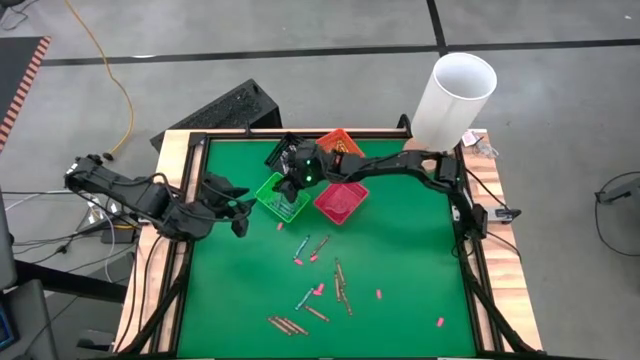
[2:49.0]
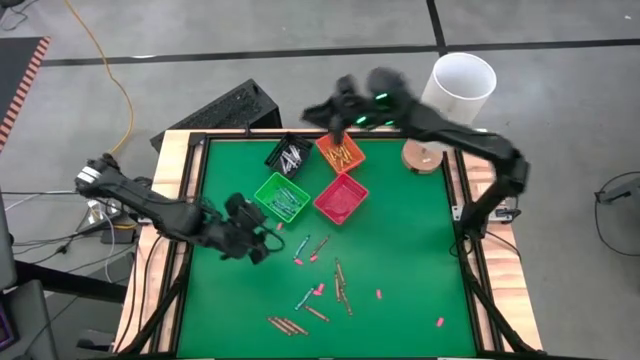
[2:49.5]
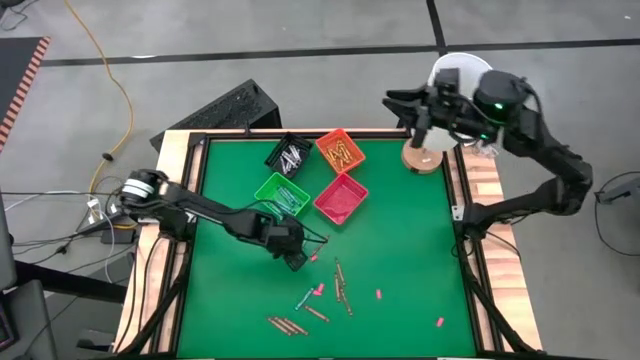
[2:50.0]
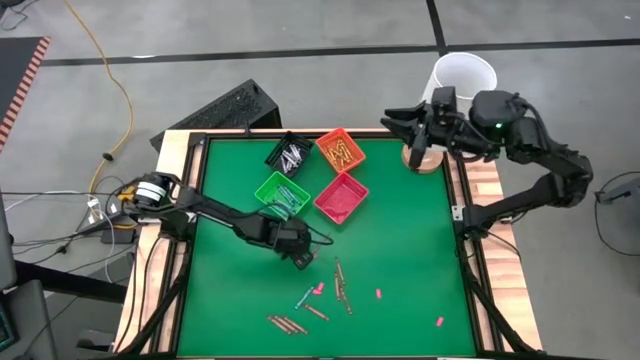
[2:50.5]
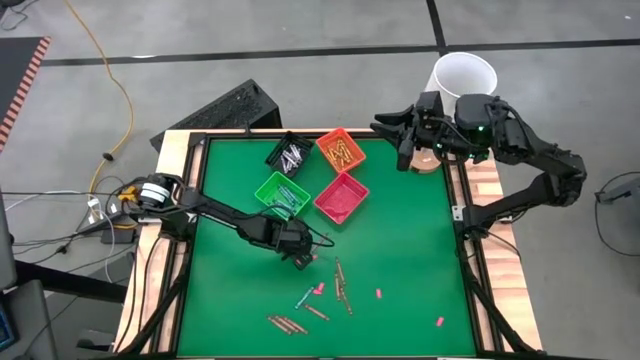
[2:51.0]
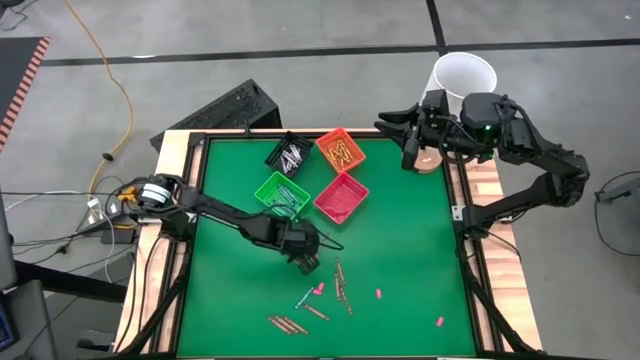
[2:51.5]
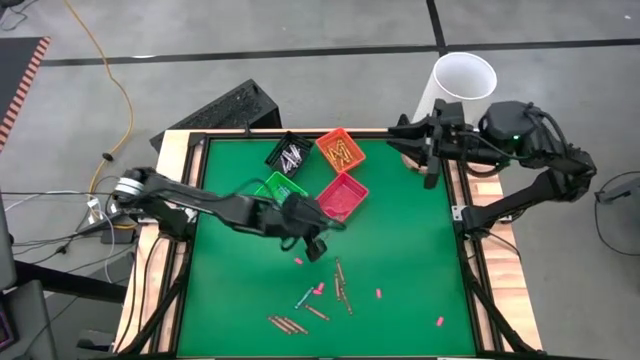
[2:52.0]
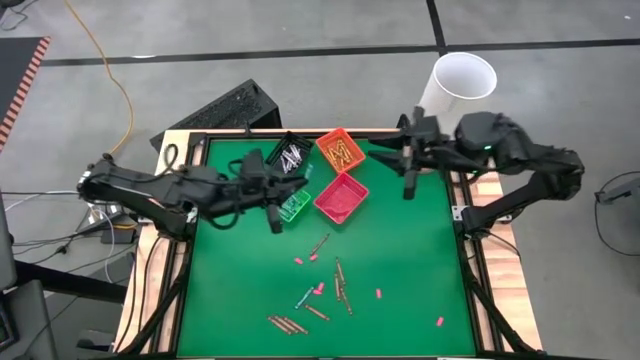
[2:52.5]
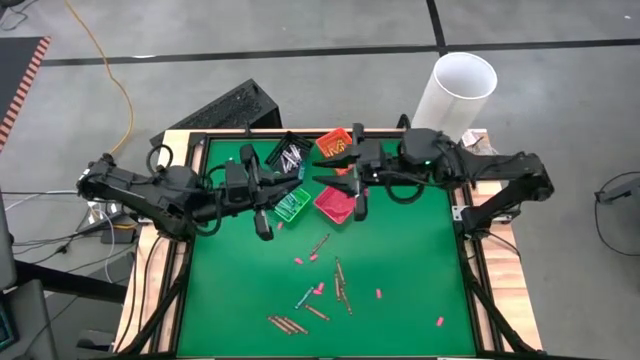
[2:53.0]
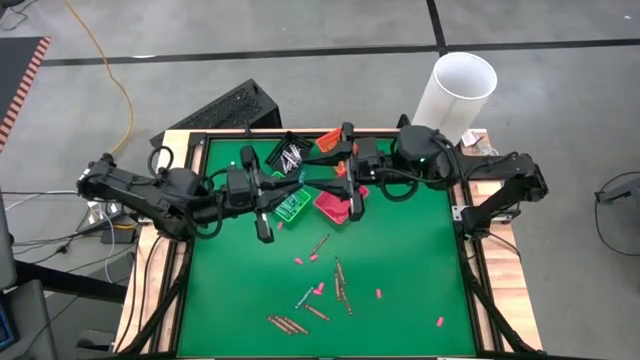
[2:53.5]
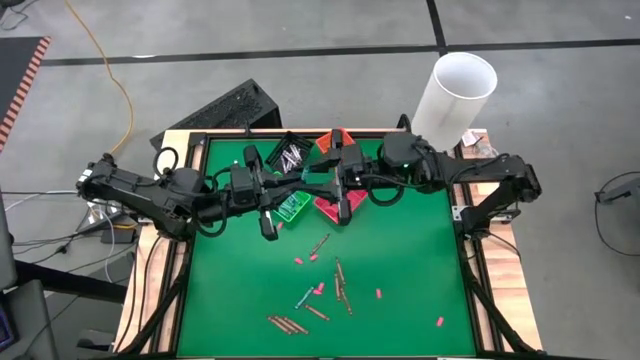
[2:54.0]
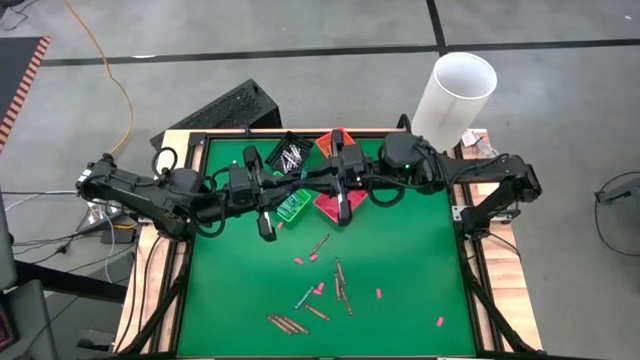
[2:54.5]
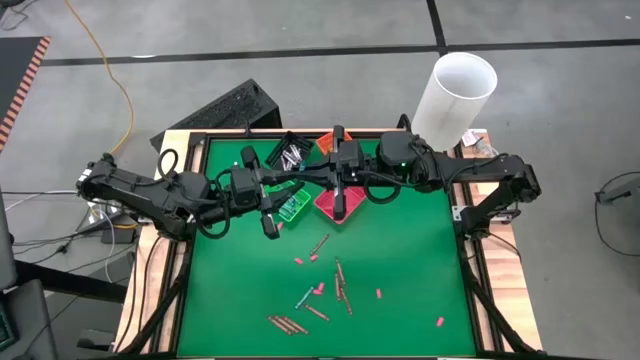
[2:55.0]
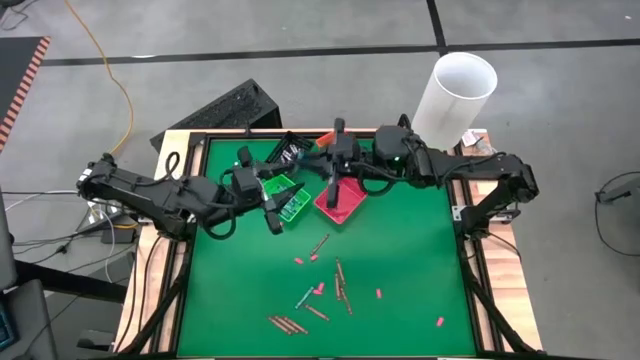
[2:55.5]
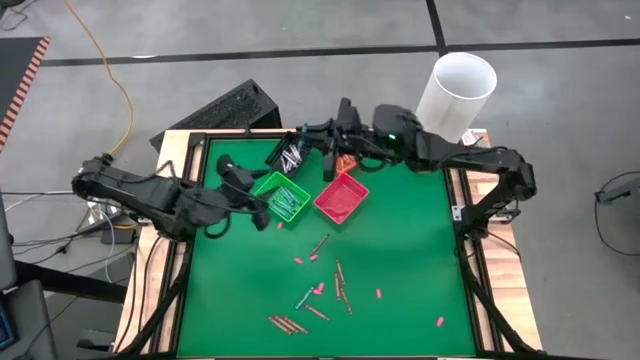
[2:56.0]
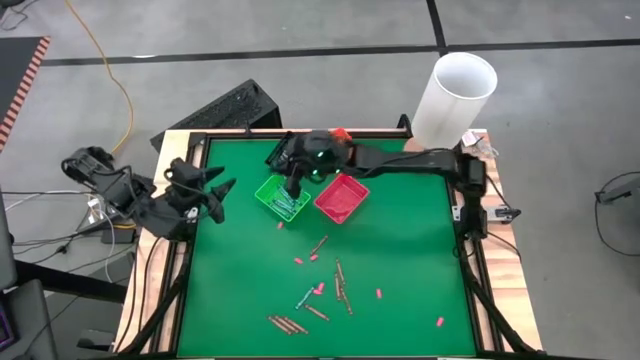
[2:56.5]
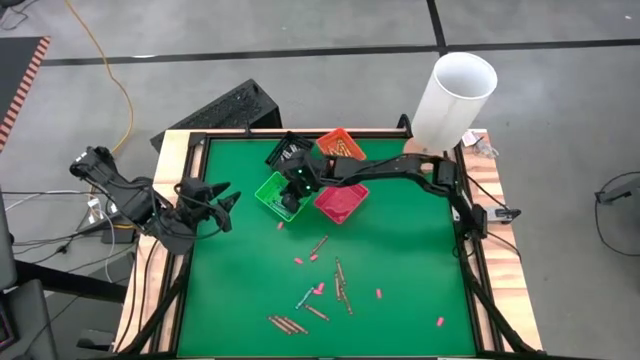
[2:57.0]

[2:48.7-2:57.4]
Task: Sort crayons
Put the blue crayon into the bin

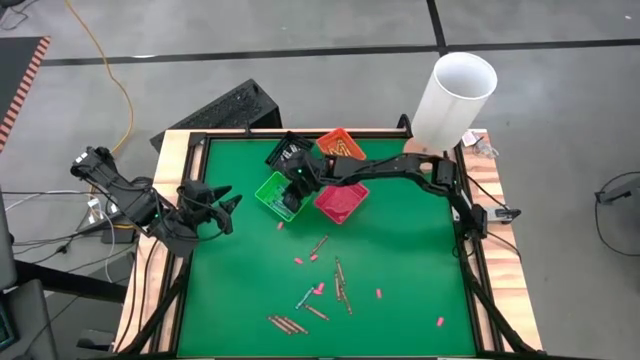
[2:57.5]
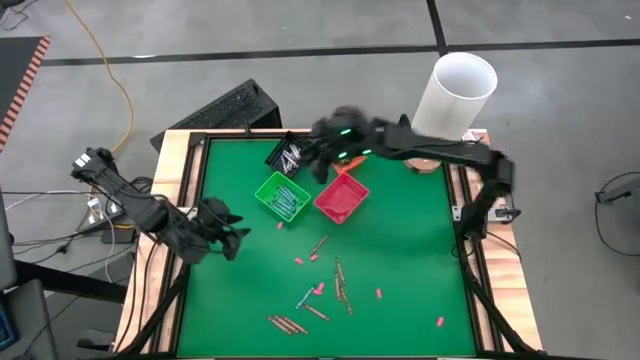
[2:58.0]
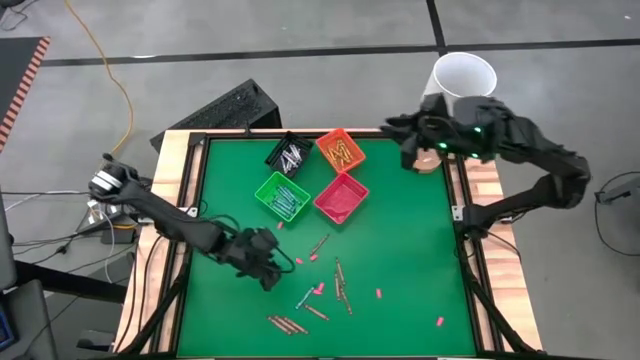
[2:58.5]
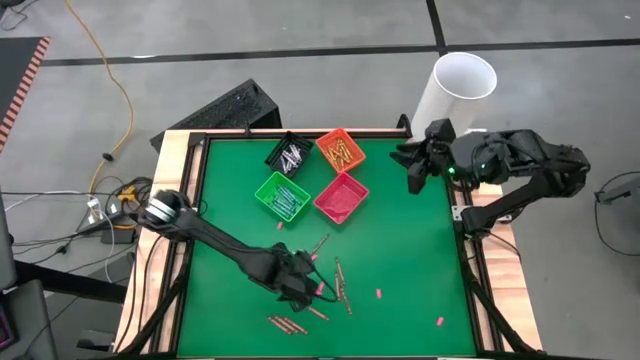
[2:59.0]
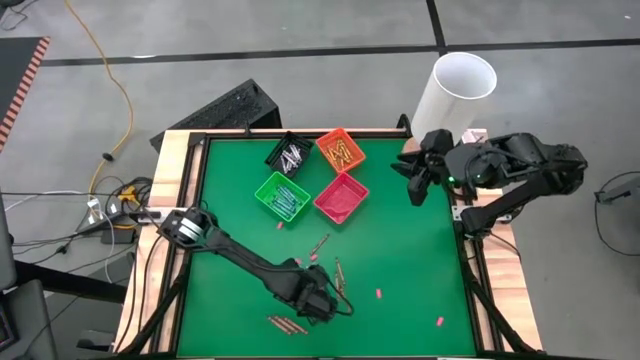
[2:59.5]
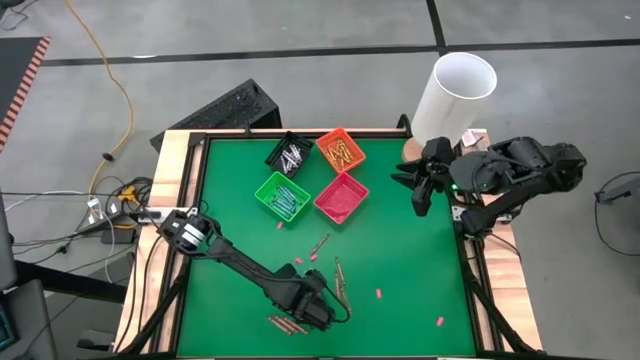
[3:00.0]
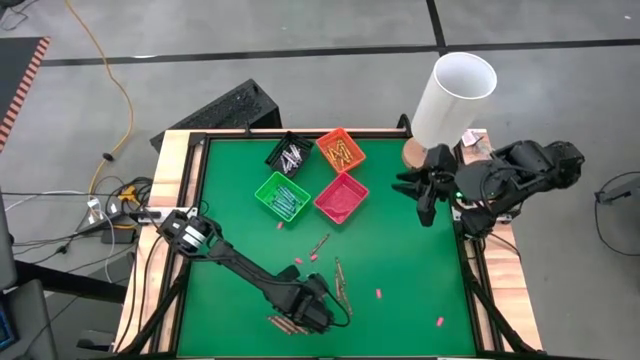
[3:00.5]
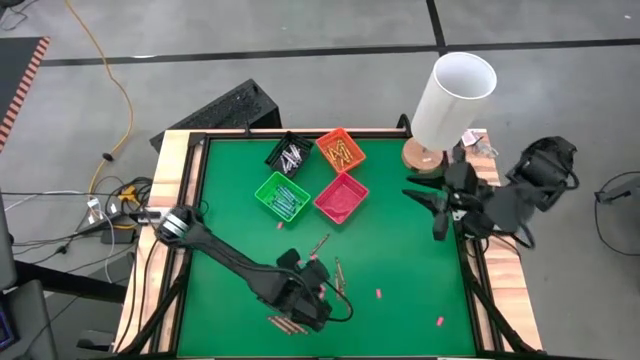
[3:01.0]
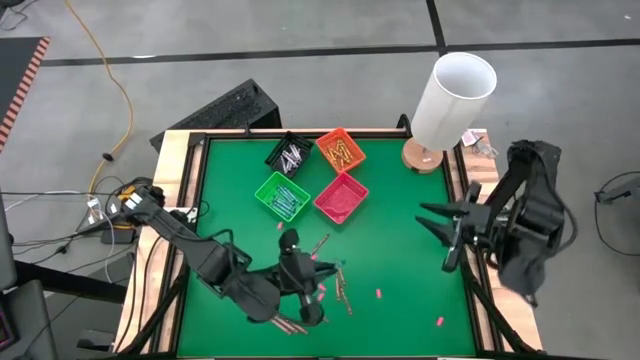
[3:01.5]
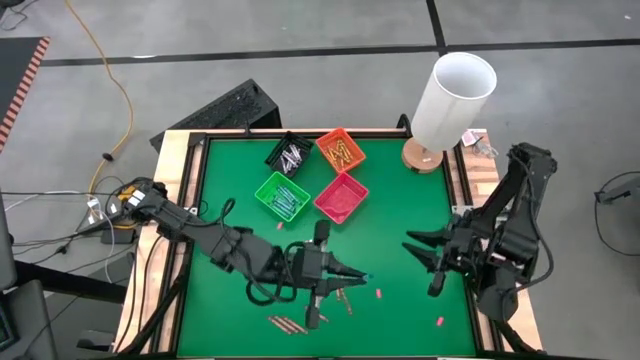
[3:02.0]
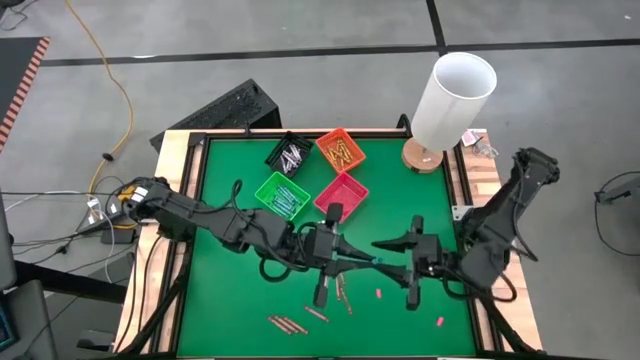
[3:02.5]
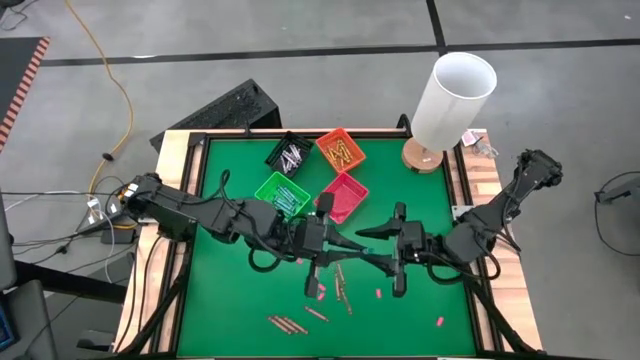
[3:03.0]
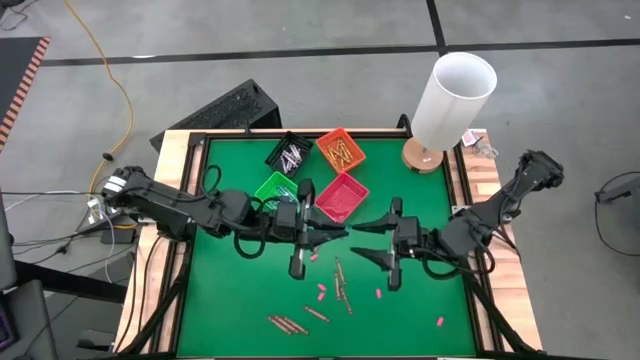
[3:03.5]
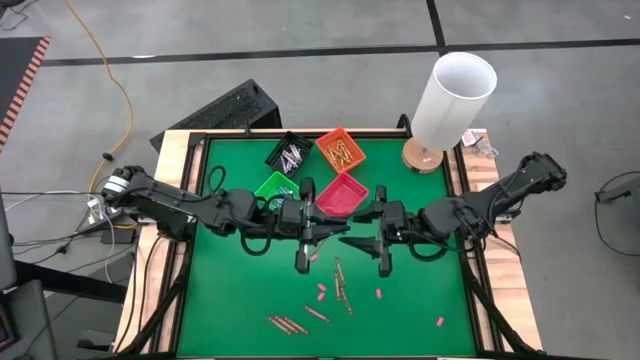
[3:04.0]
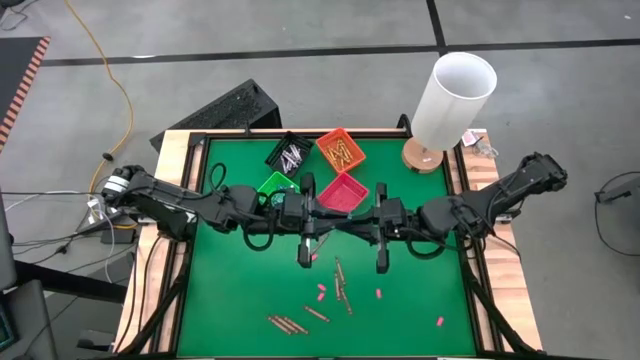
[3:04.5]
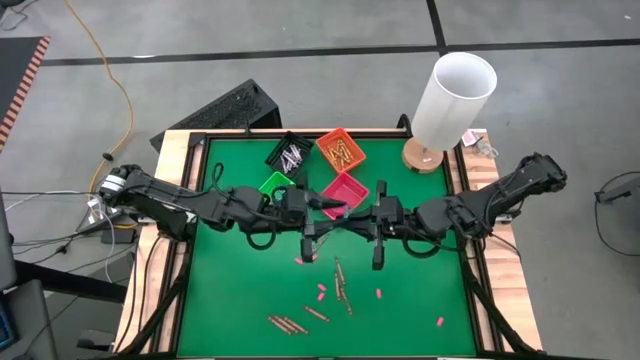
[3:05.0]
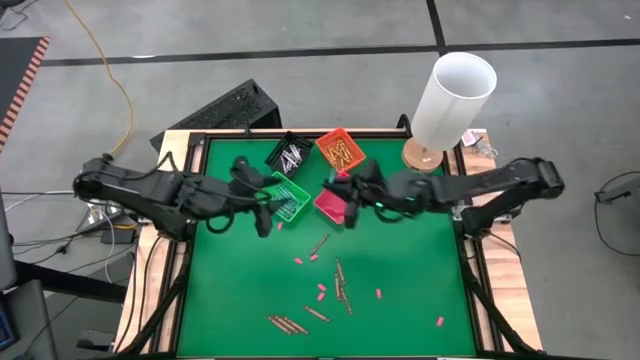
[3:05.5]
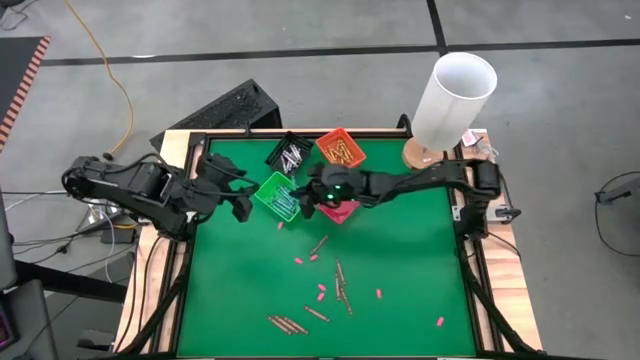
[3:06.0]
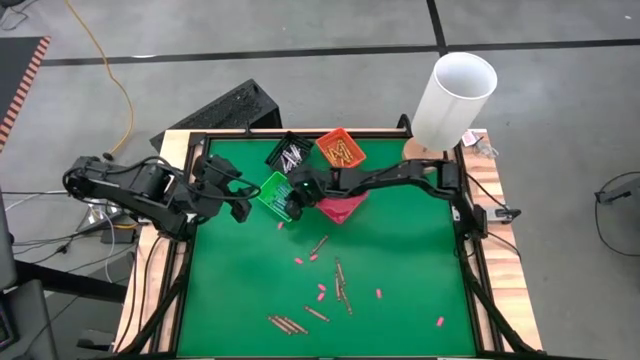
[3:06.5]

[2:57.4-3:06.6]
Put the blue crayon into the bin
